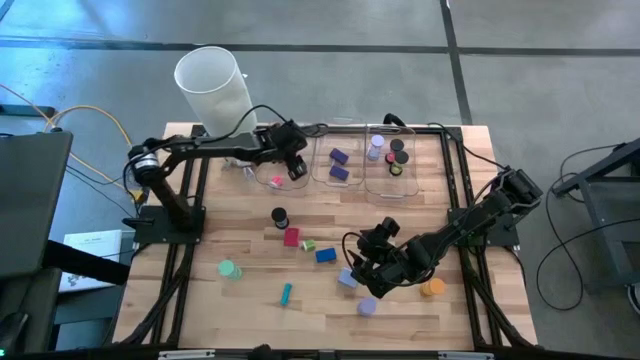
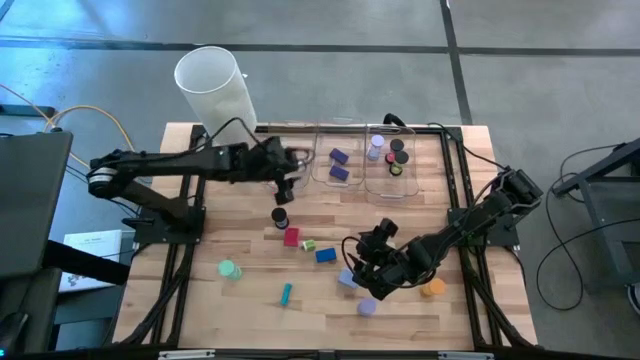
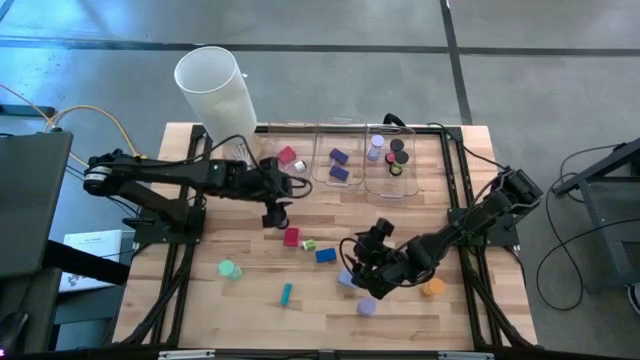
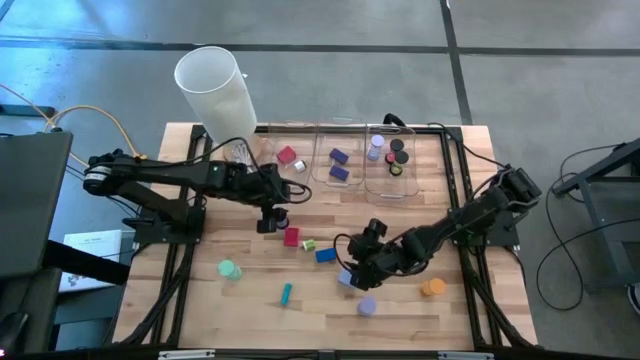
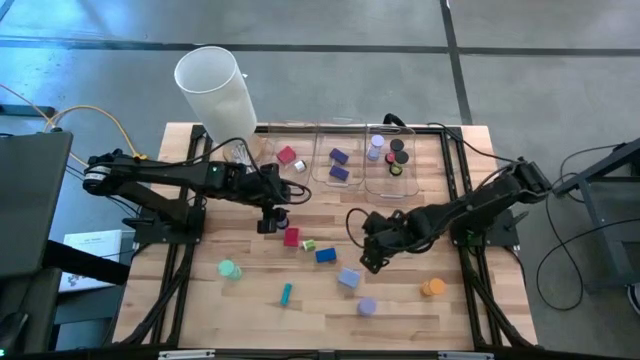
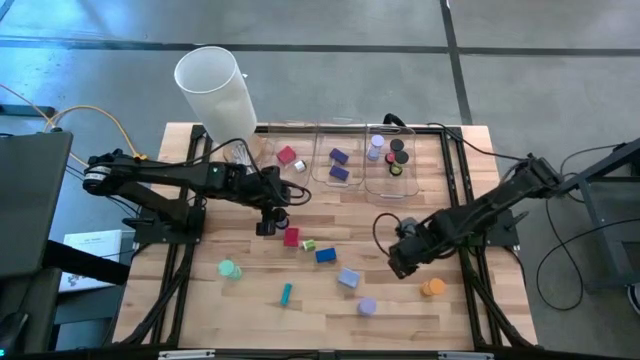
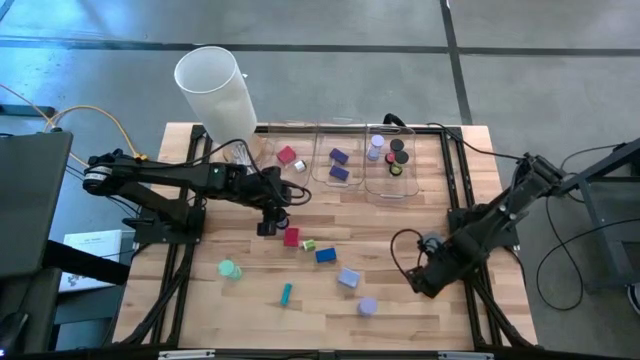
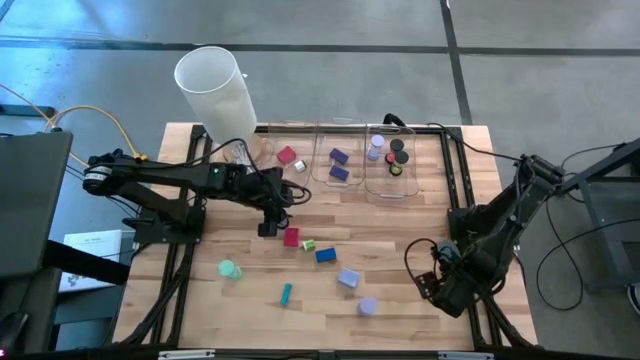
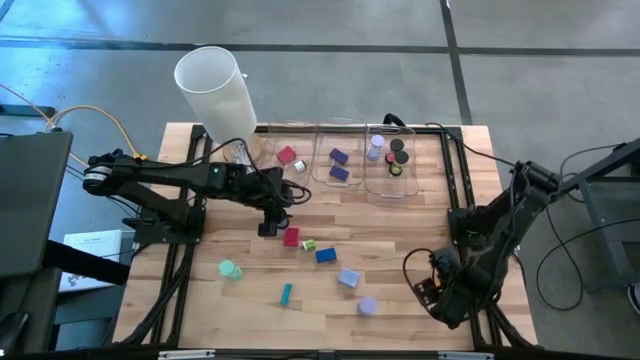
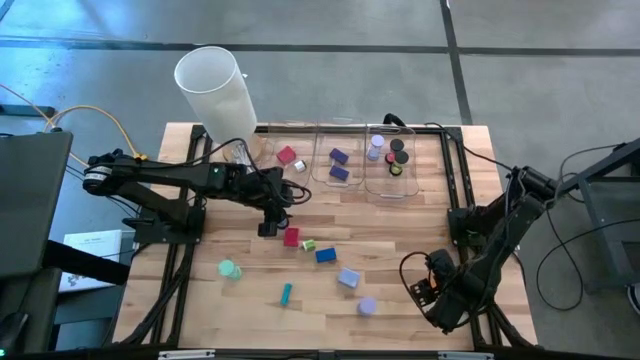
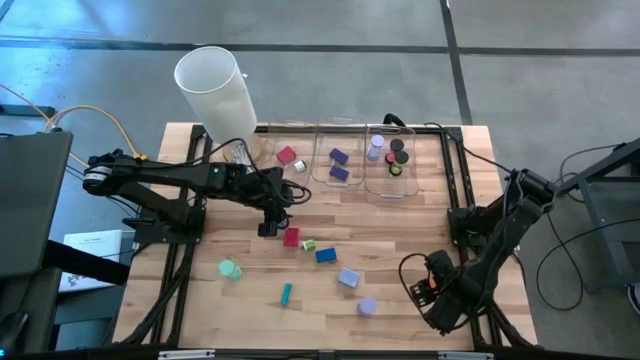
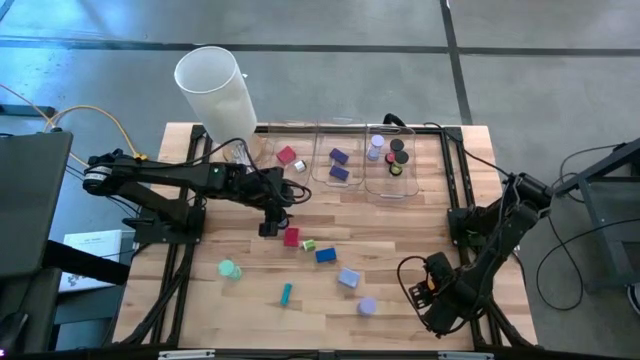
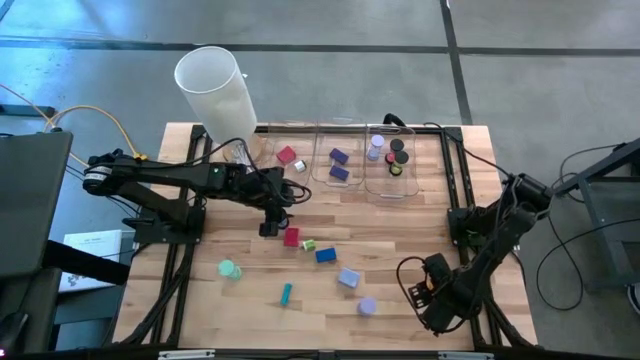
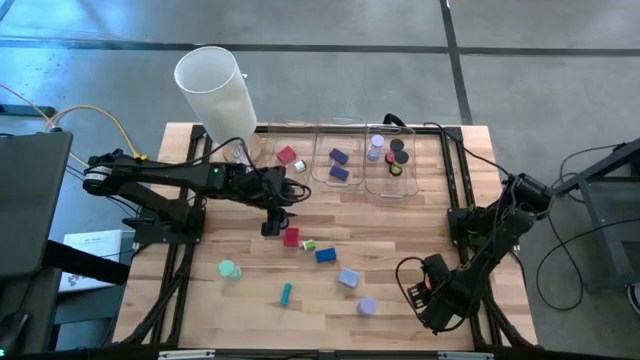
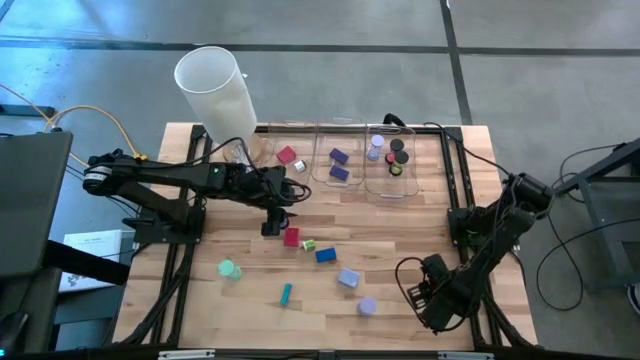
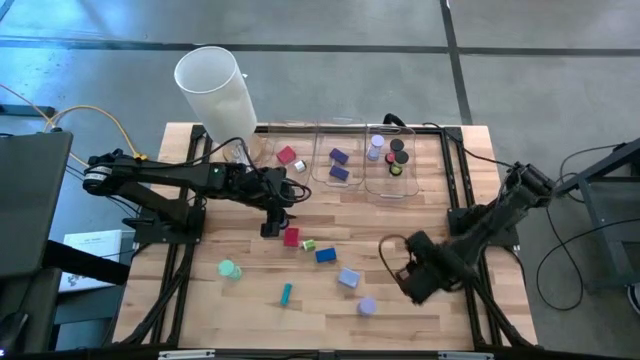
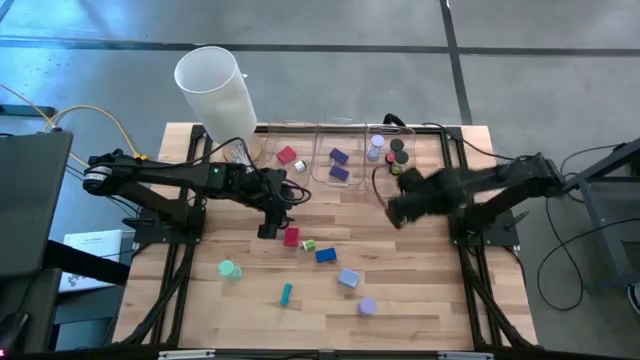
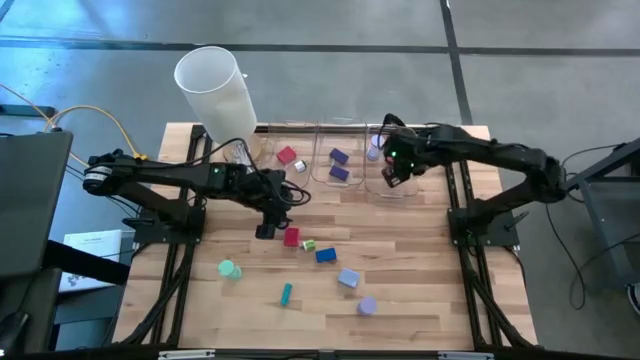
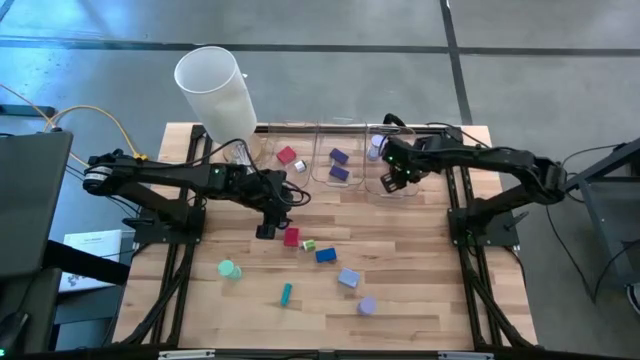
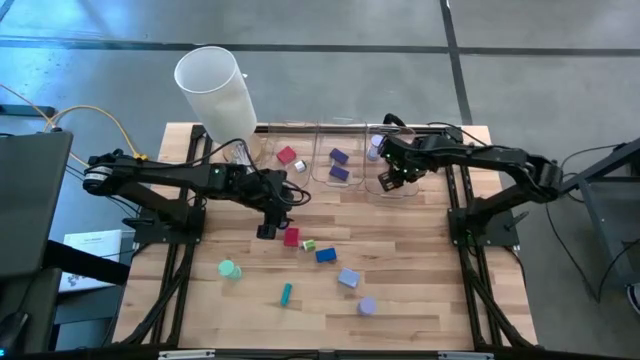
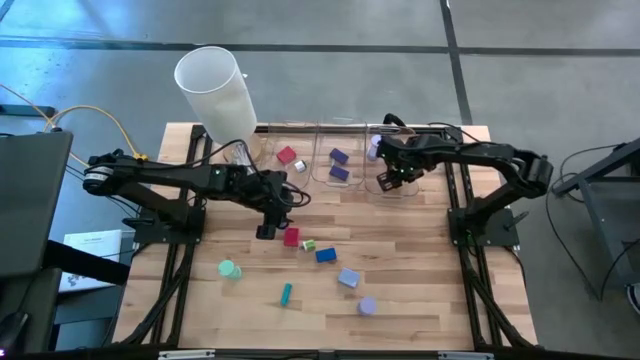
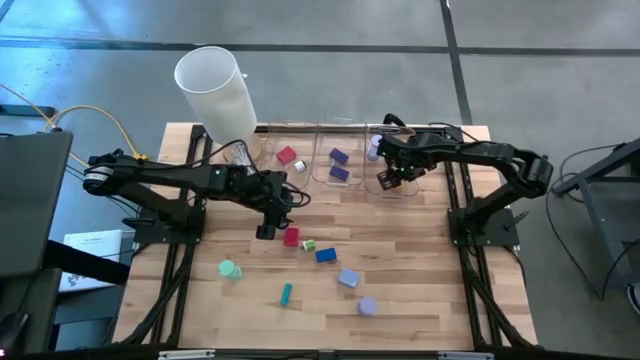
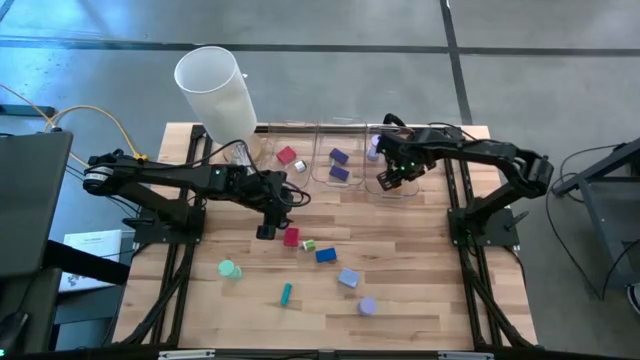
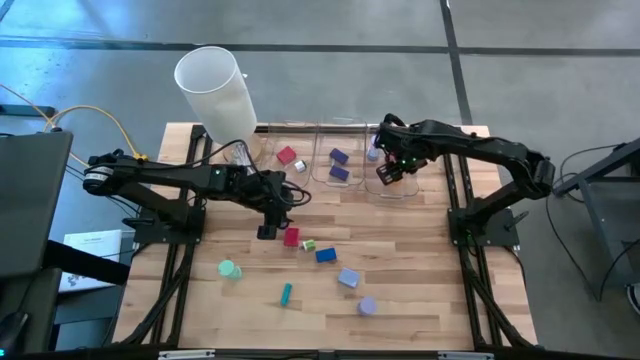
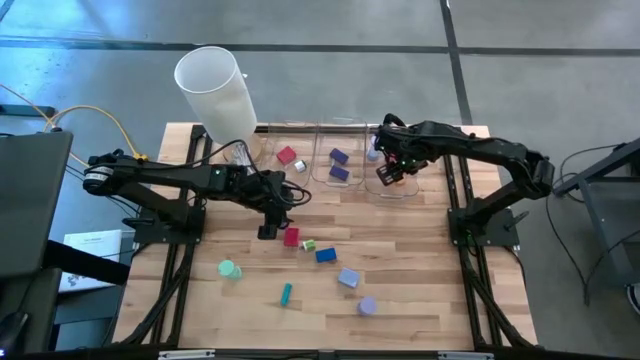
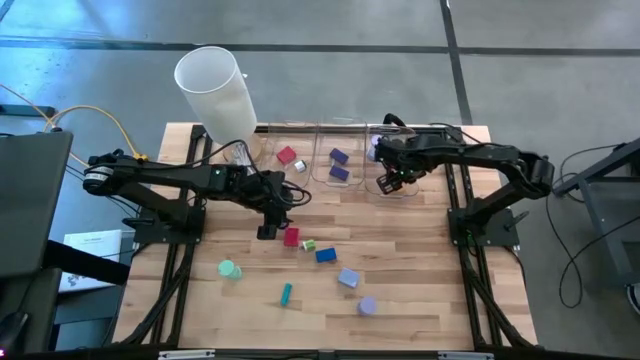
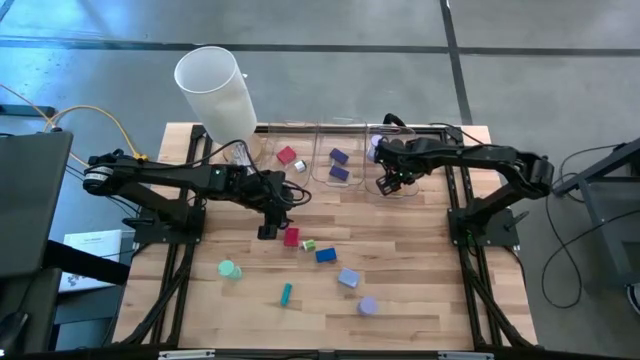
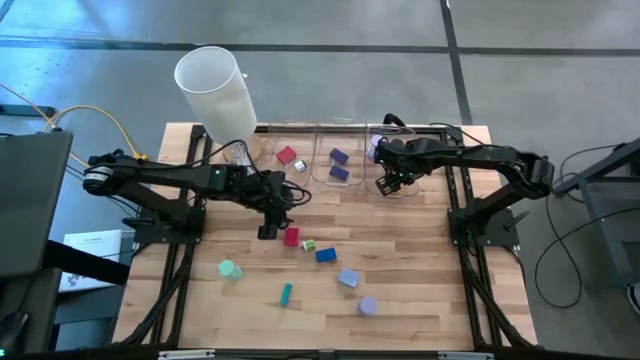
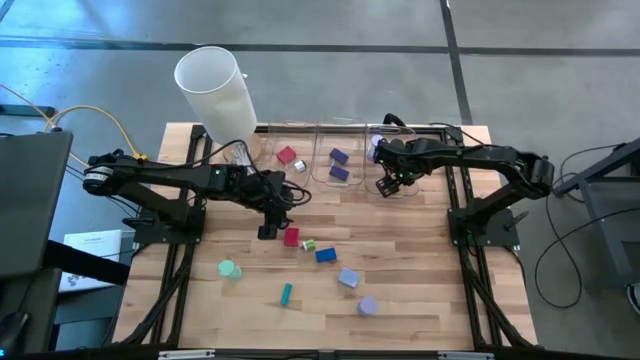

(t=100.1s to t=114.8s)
Task: Pick & Place Office items
Put the yellow hourglass into the right transparent bin

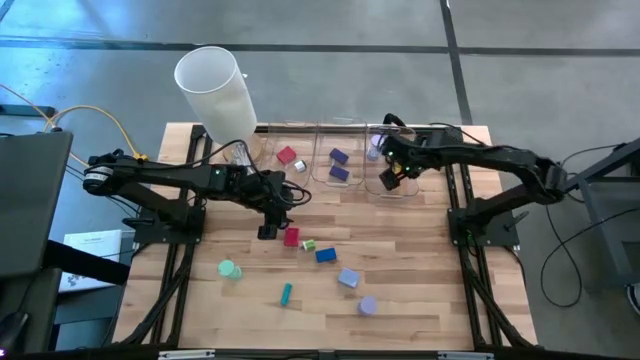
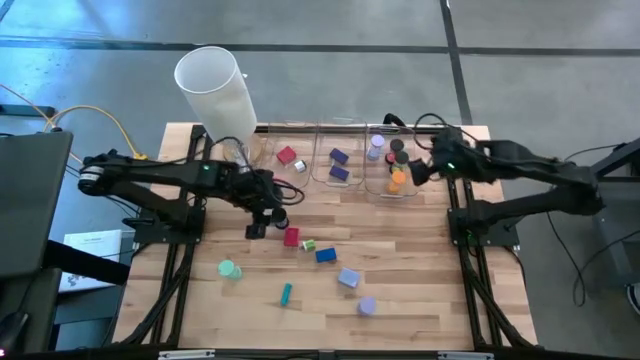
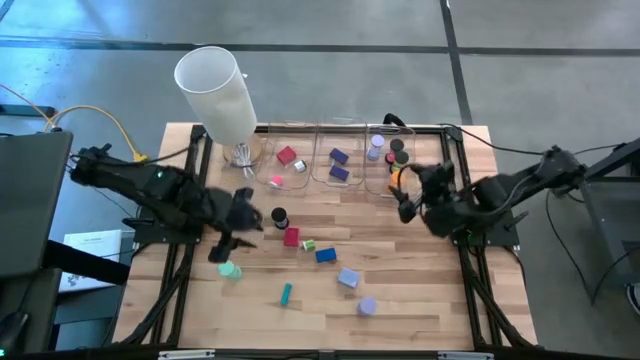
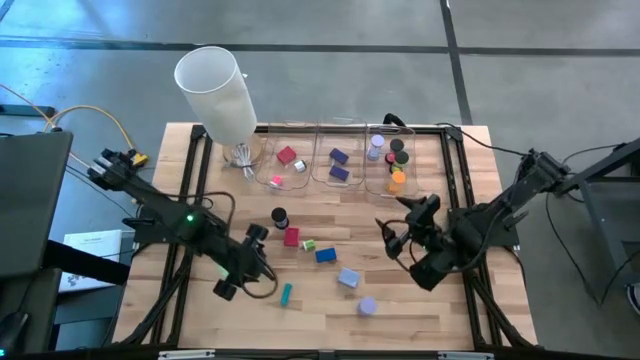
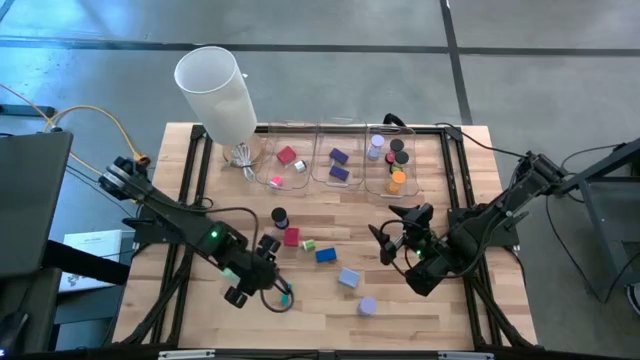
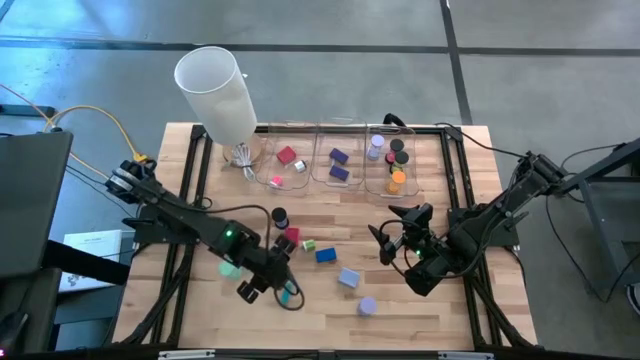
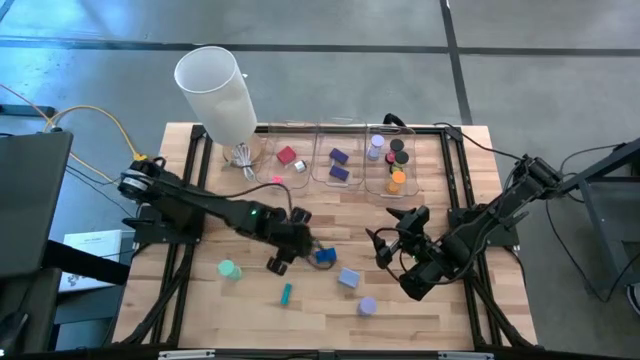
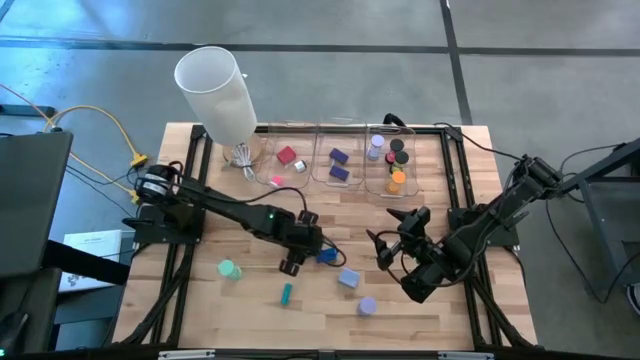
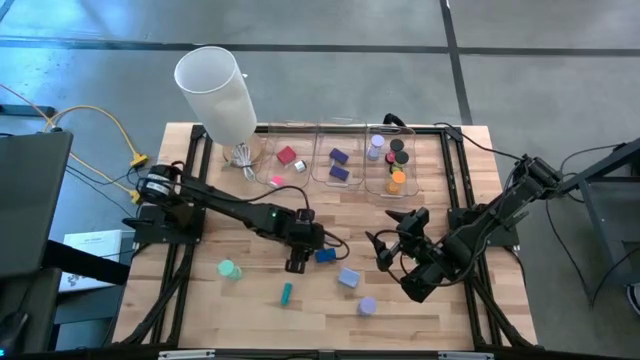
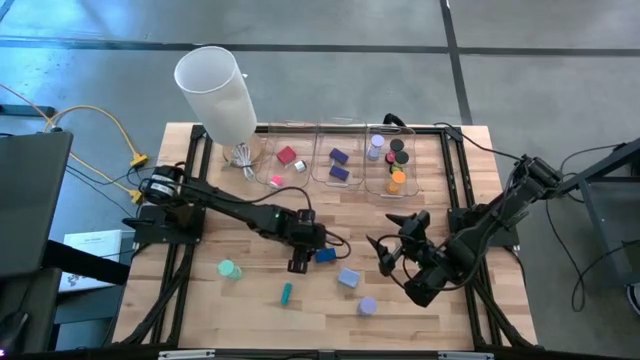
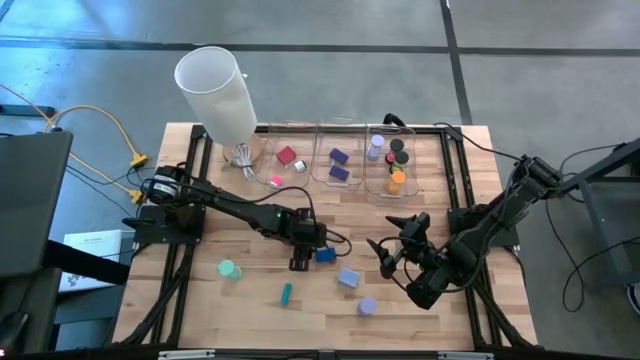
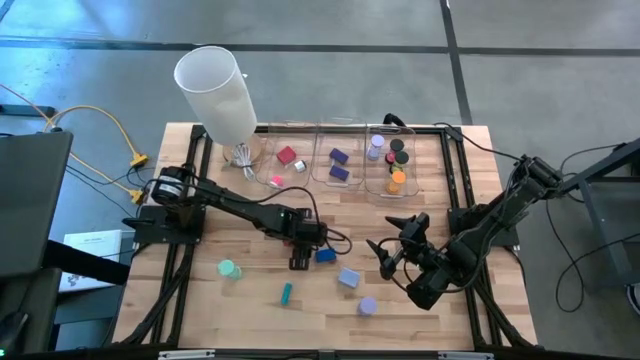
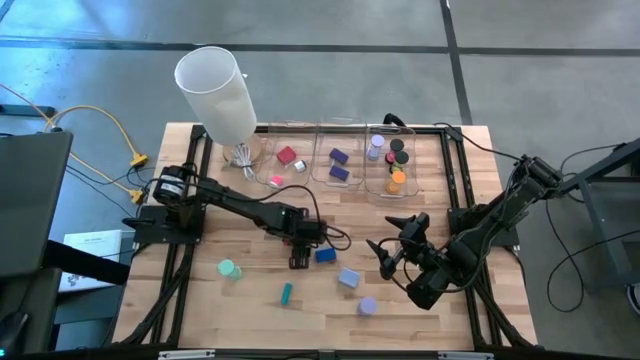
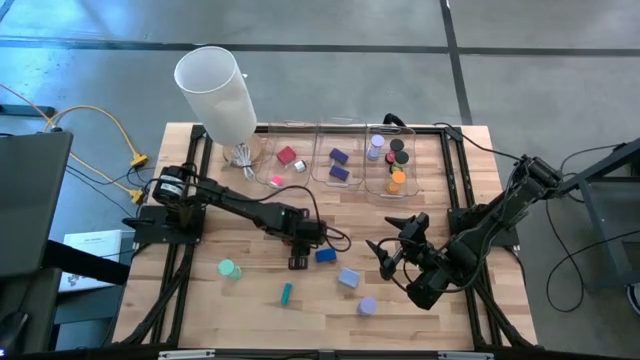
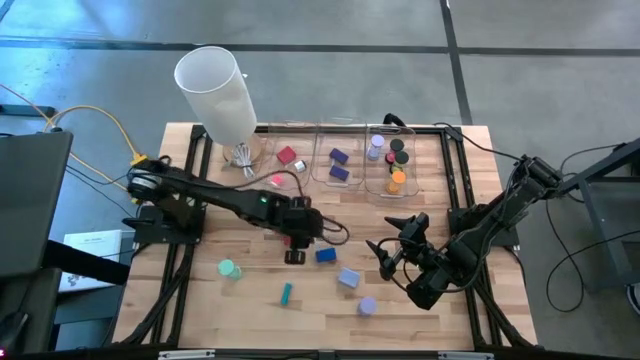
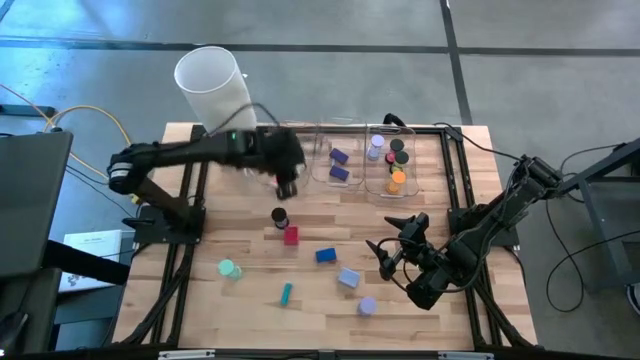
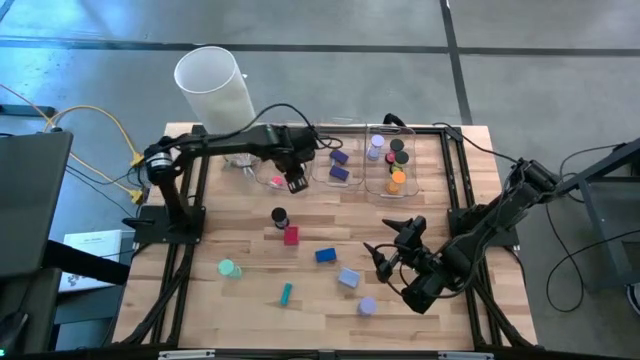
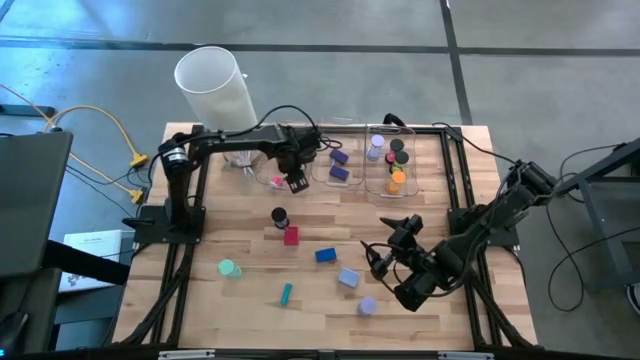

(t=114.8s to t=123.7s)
Put the green charger adapter into the left transparent bin
